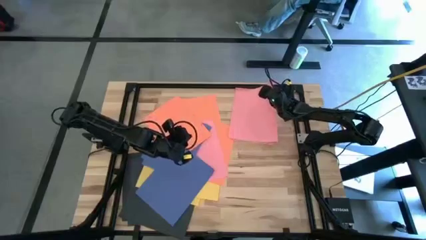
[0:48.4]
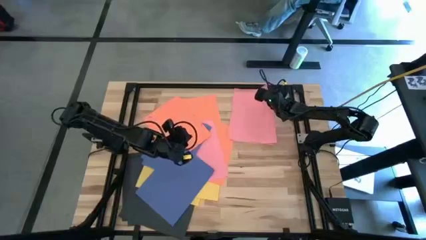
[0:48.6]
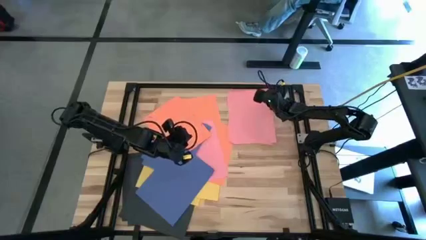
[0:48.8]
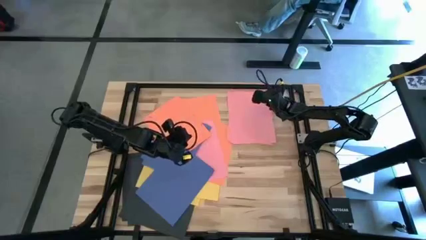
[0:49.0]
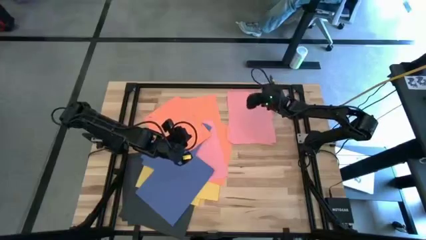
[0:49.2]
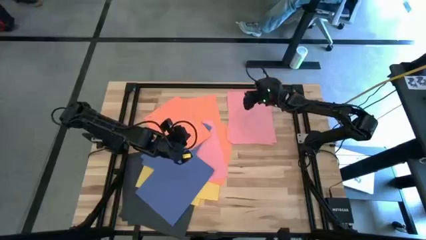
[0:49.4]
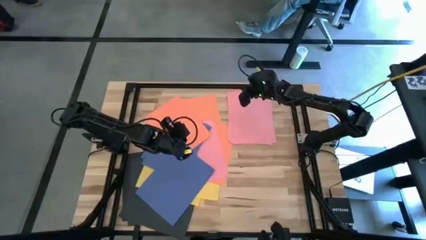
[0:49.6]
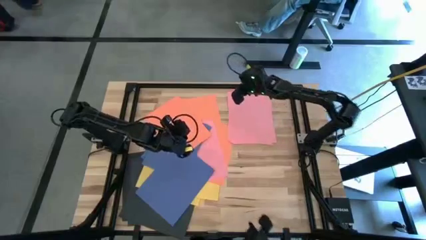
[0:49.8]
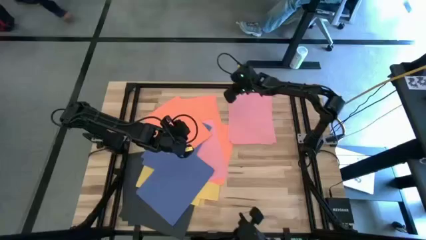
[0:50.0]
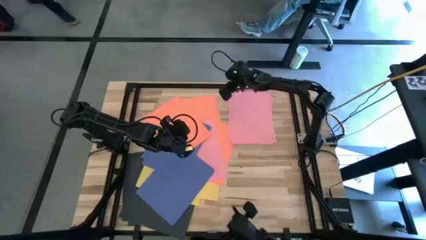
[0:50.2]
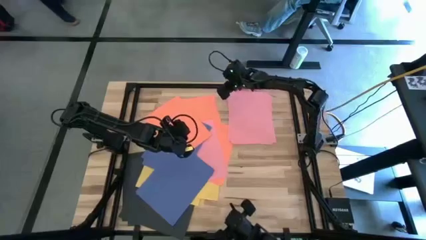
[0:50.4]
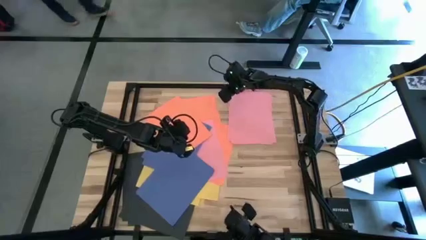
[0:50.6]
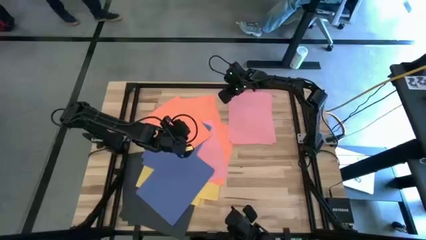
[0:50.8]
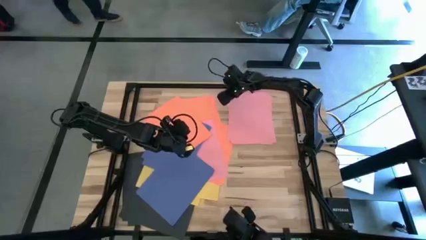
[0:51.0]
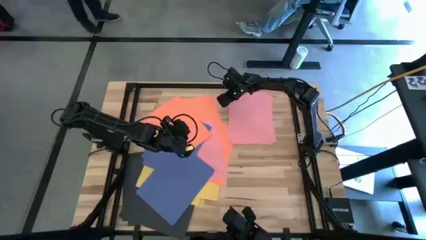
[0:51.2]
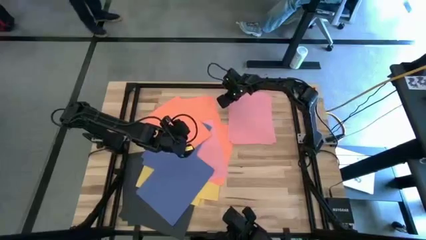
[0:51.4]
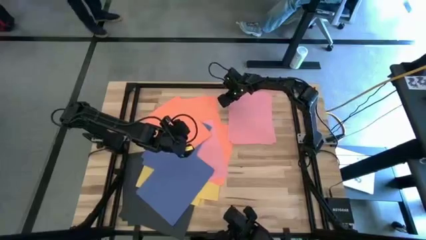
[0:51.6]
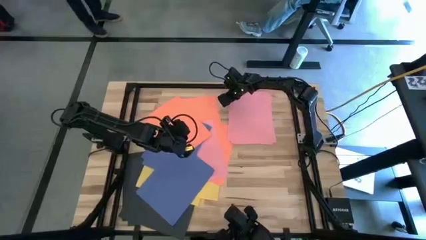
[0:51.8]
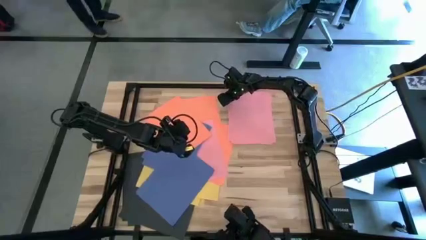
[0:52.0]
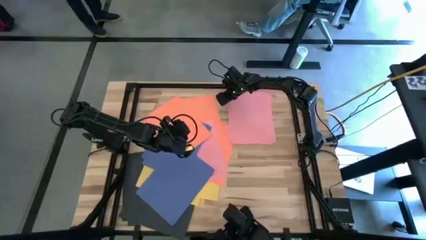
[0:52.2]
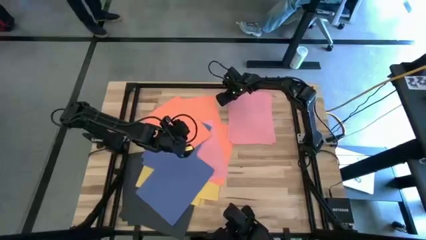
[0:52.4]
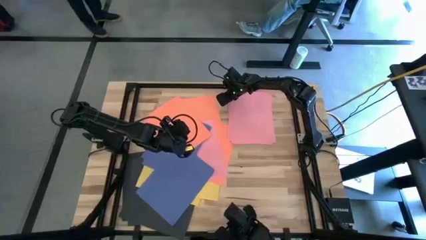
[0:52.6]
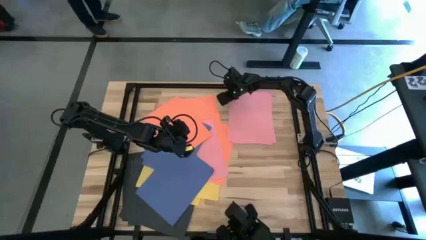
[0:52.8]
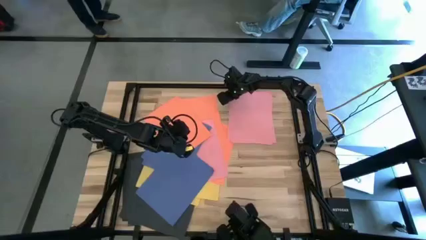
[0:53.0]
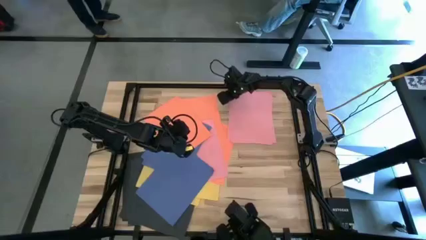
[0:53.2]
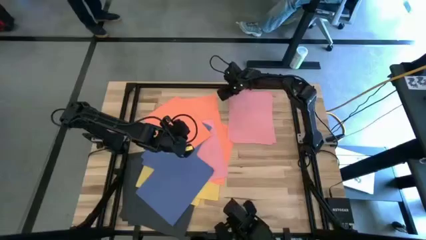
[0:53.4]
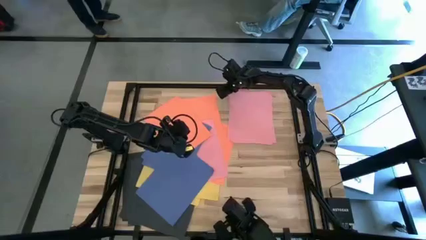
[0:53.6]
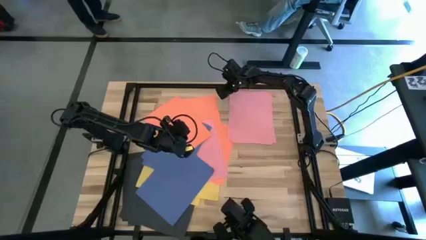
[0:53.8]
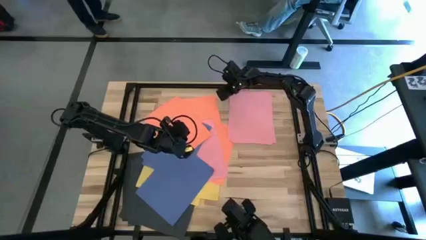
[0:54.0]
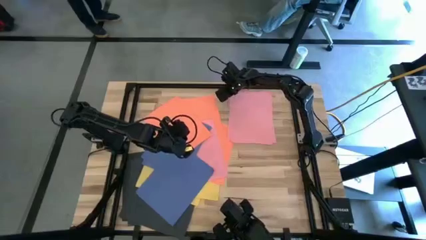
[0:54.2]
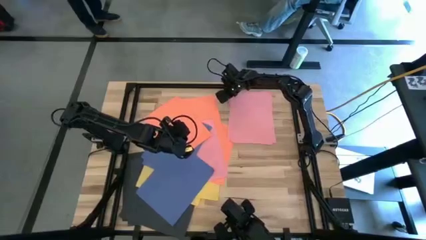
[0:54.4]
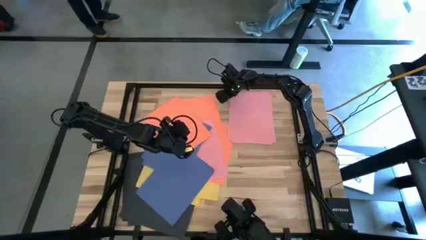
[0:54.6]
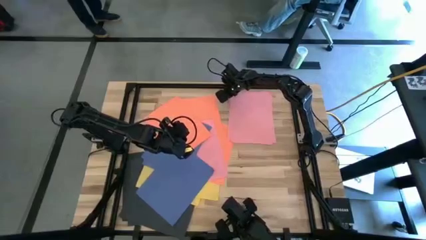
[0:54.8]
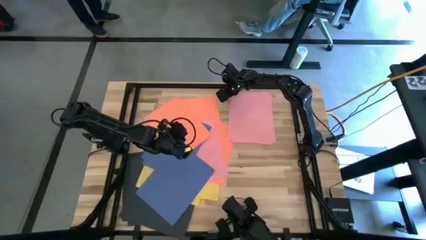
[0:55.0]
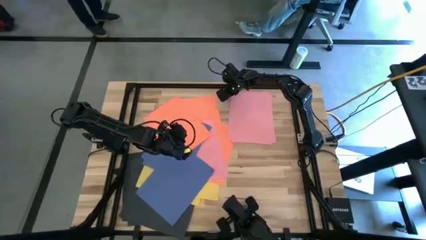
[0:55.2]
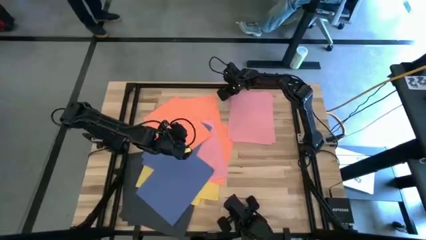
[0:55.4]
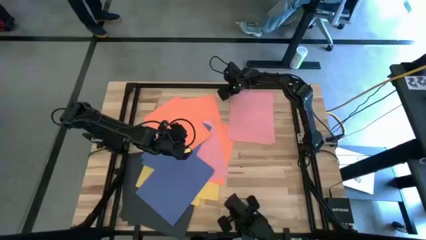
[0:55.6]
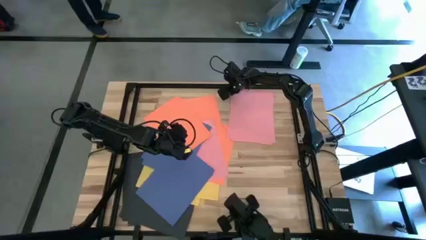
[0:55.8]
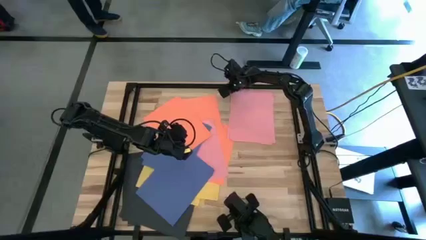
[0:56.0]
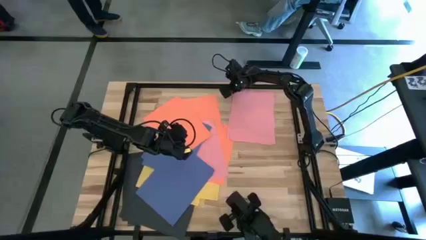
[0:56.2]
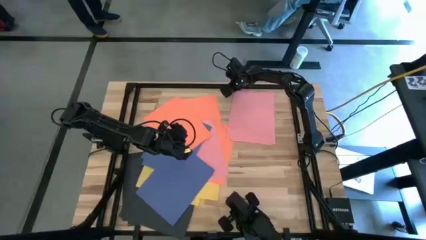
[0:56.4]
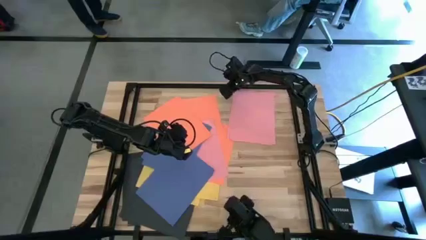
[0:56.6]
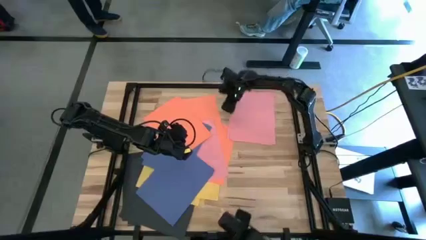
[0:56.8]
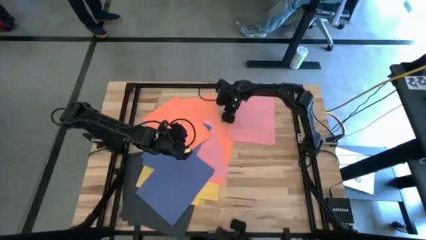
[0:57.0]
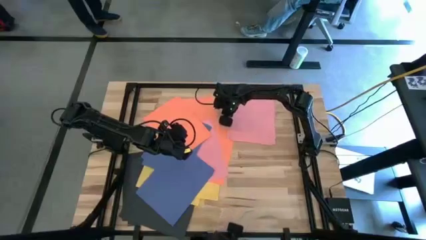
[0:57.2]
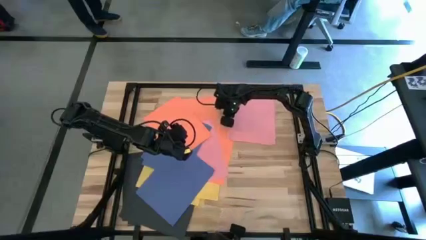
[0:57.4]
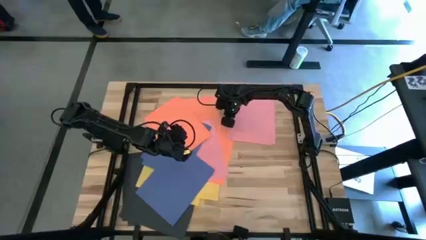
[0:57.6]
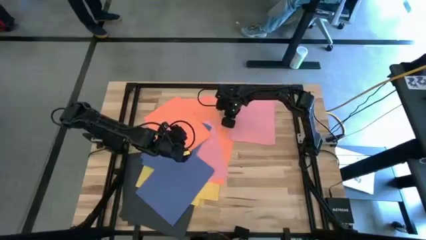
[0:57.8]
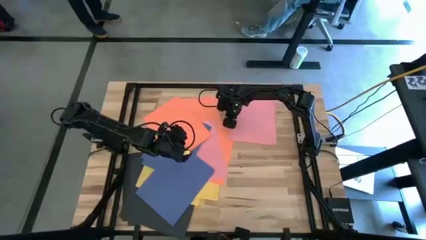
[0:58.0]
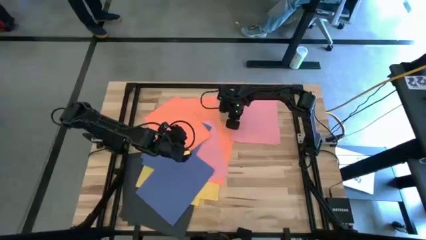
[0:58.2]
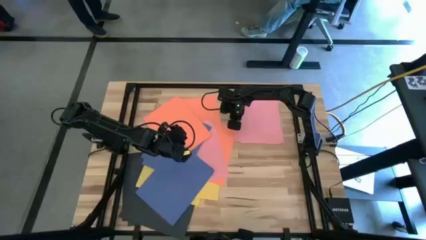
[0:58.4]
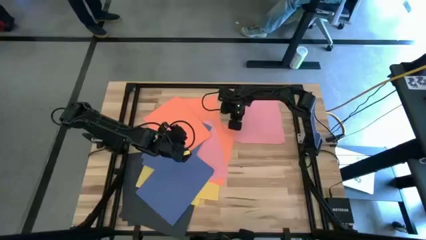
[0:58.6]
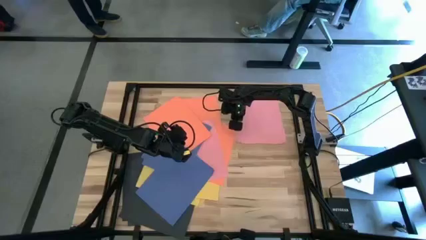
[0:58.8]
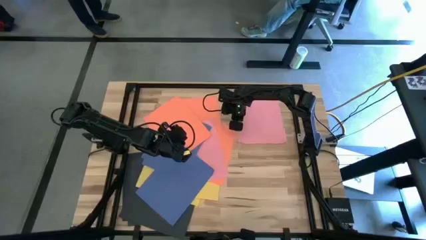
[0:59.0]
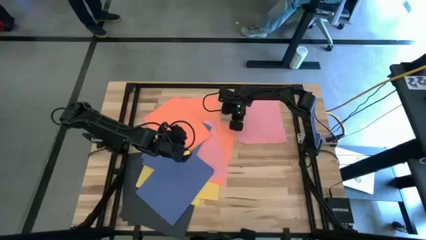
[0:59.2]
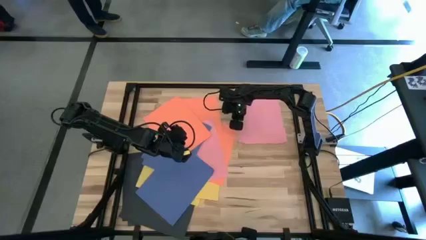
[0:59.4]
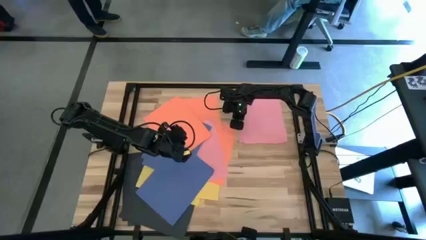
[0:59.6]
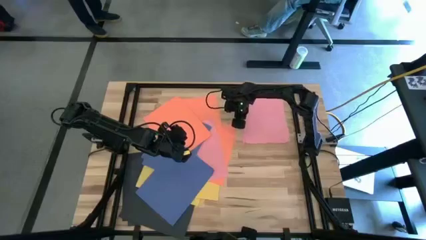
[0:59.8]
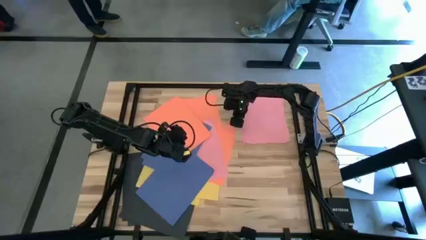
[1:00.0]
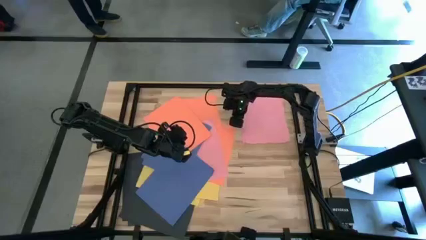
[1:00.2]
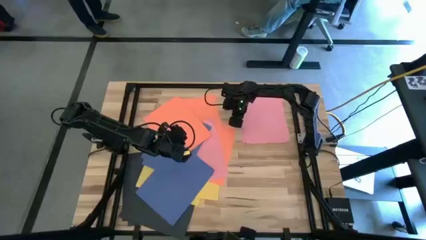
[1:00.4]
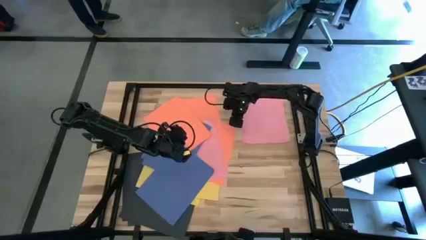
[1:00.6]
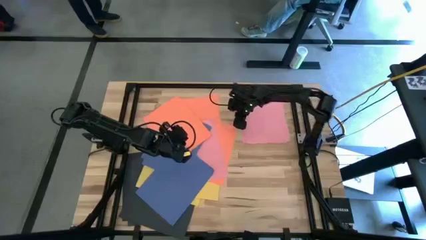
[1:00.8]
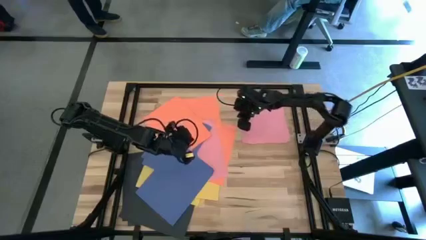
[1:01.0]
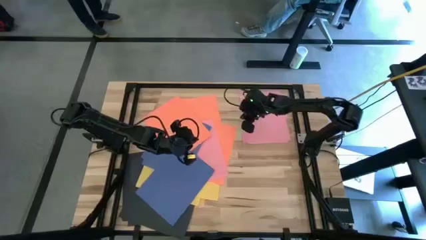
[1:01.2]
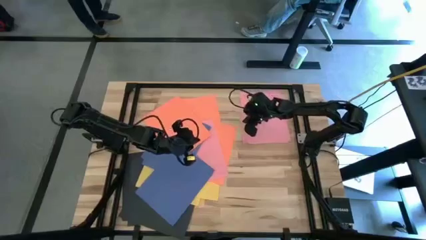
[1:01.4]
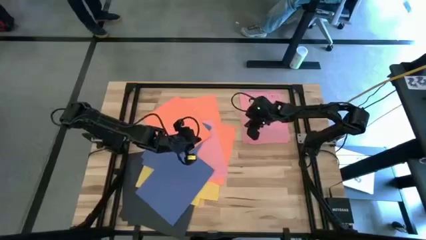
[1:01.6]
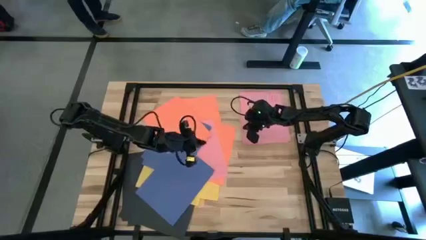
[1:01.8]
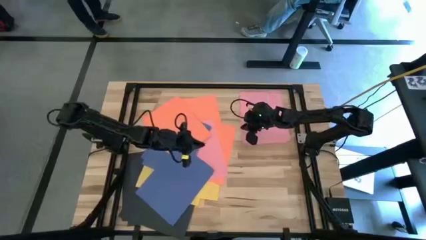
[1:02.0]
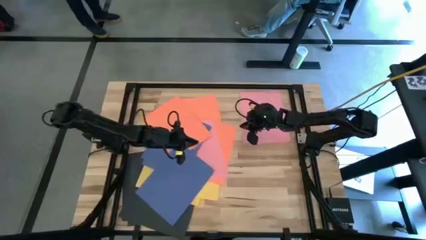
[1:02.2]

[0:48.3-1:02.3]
Task: Organize paper
Stack the pink paper on top of the pink paper

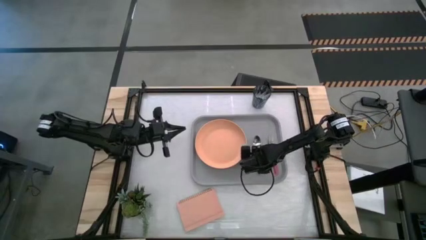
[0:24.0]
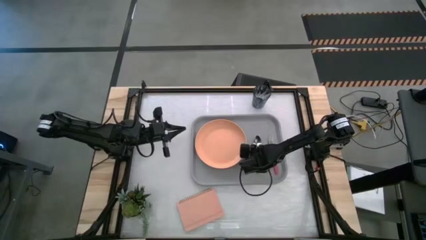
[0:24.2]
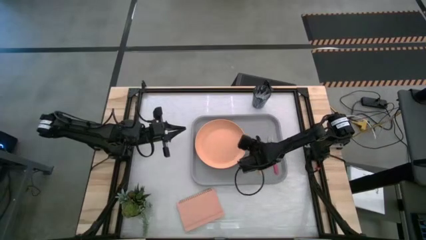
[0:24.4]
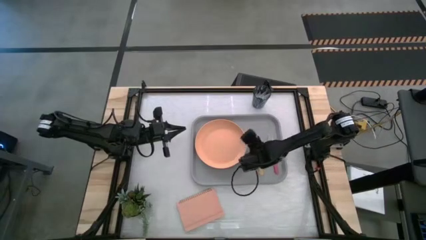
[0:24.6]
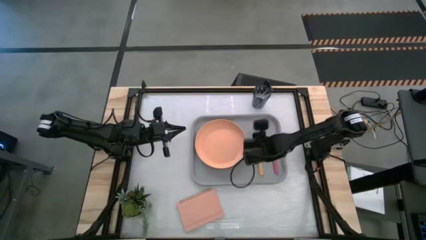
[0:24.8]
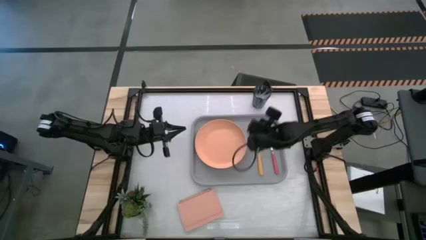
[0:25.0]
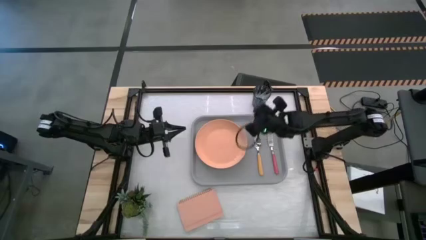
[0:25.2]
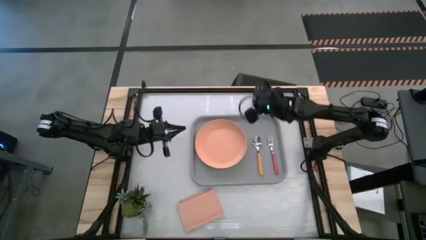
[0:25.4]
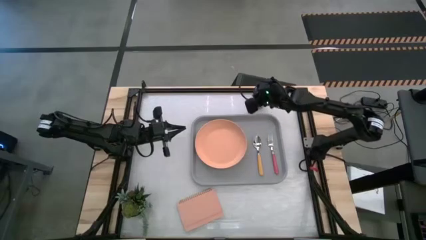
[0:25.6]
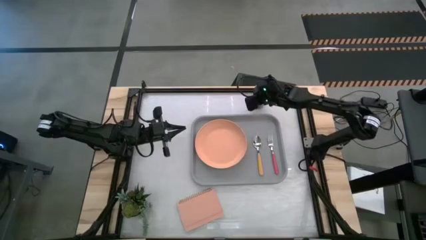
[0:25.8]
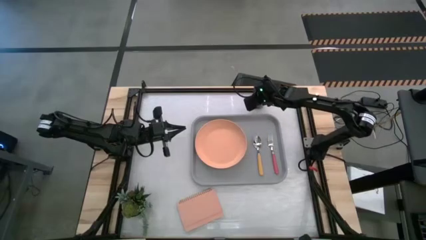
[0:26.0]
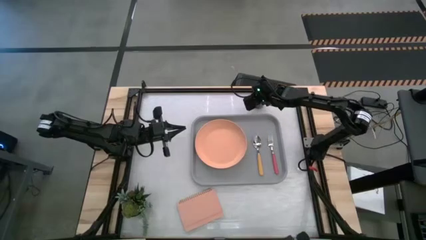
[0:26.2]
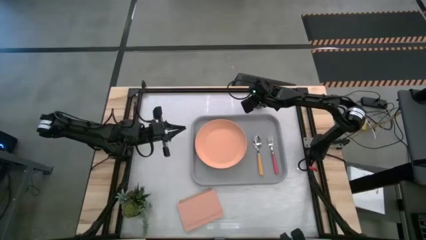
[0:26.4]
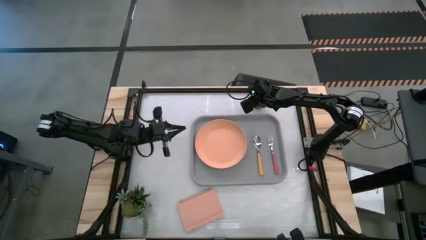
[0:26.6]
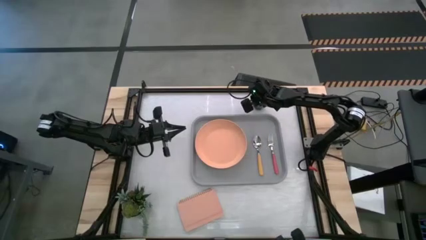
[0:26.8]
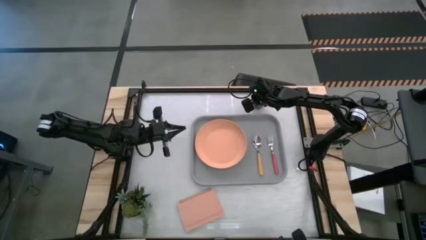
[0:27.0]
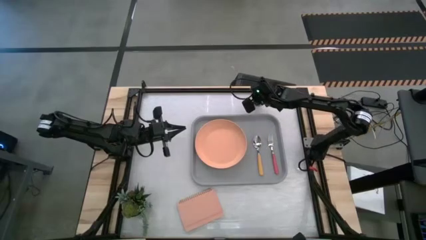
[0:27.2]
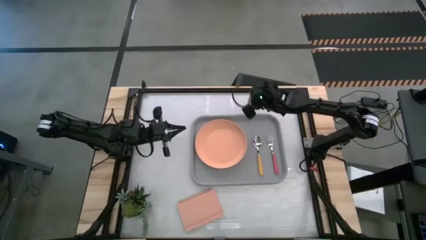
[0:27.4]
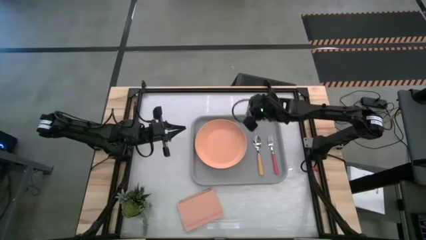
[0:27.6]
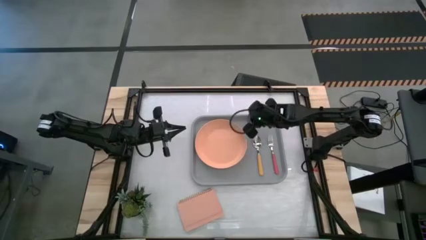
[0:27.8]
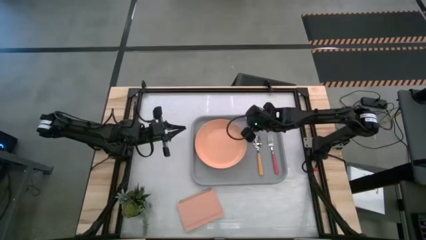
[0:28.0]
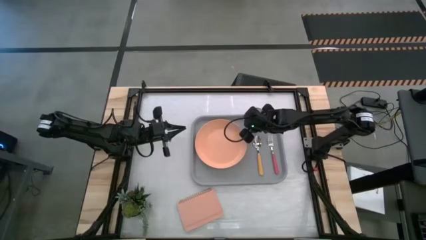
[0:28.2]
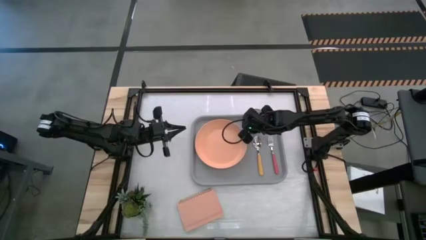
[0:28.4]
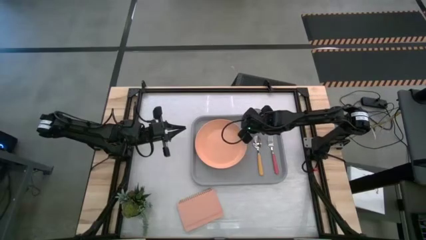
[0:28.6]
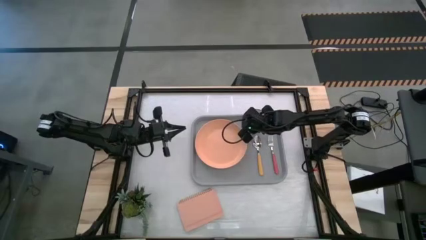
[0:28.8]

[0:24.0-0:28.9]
Task: Pick and place plate/cup/fork/spoon on tray
Put the black cup on the top right of the gray serving tray
